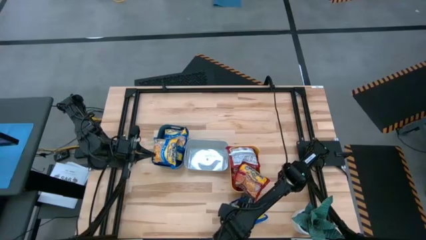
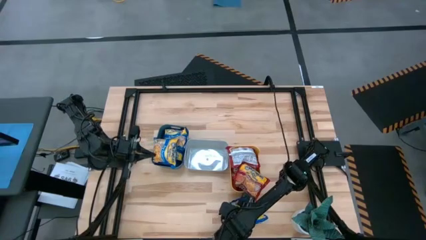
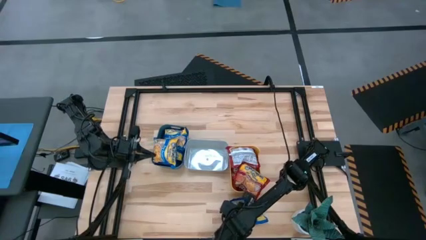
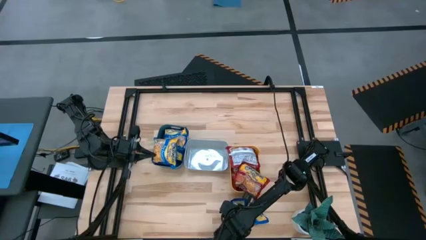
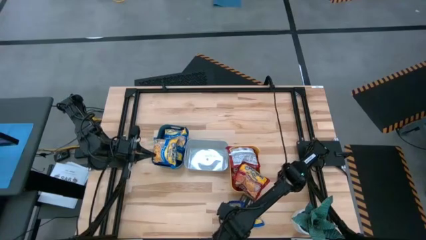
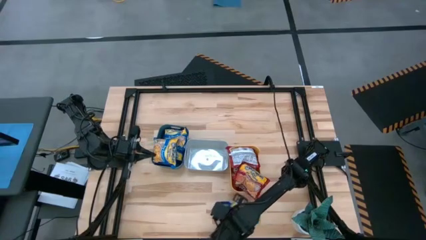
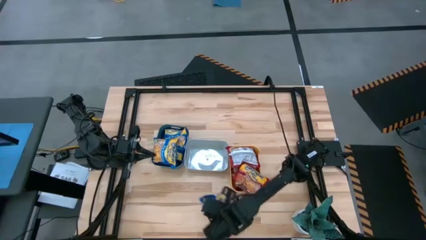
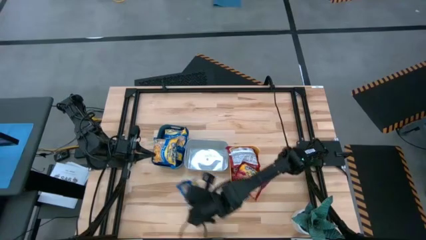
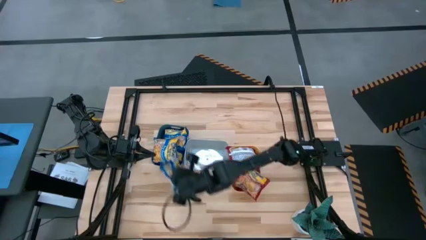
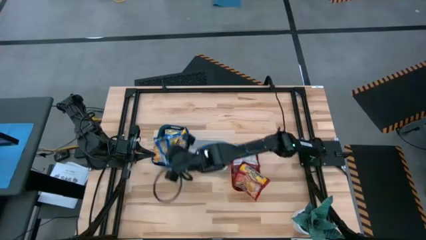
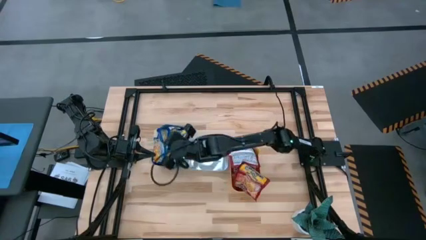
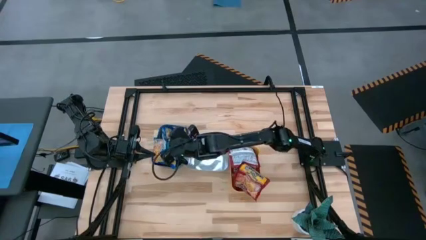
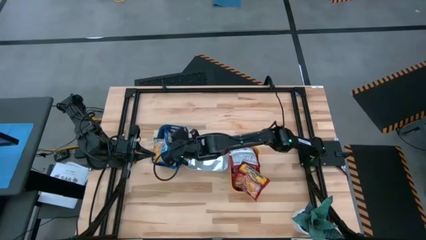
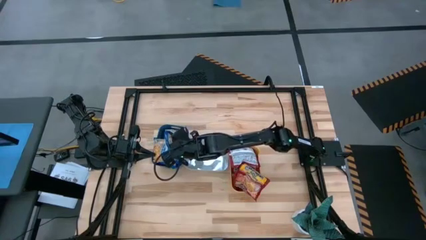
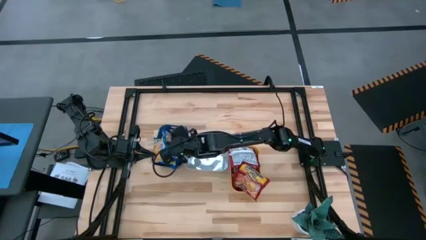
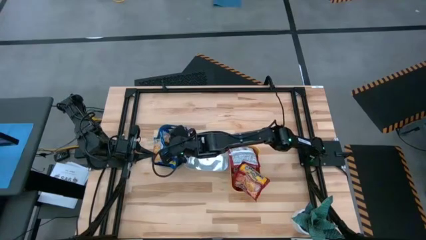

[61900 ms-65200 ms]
Task: Sort Maruchan noodles
Put the blue noodle pack into the green bin

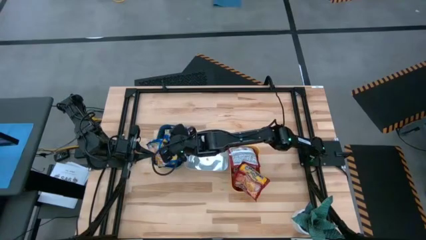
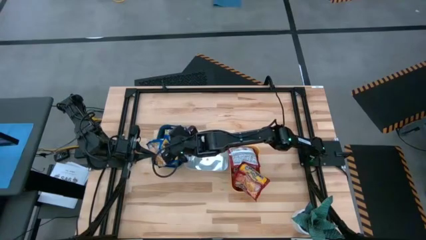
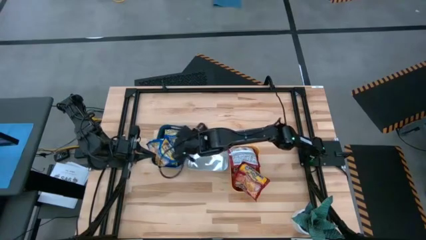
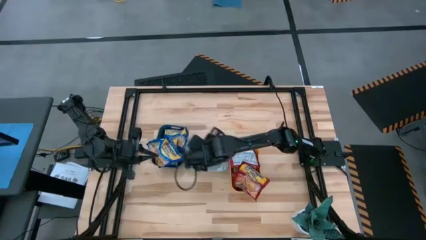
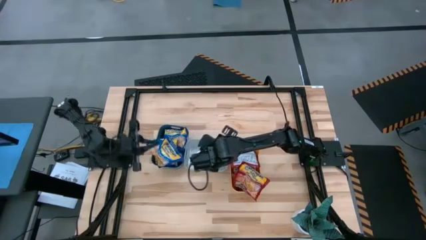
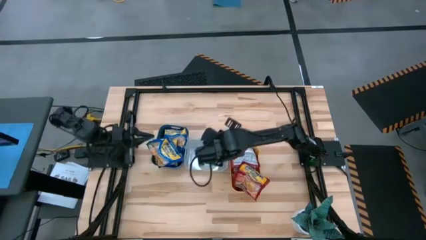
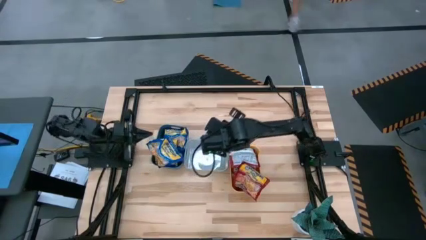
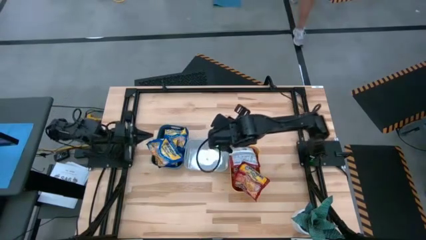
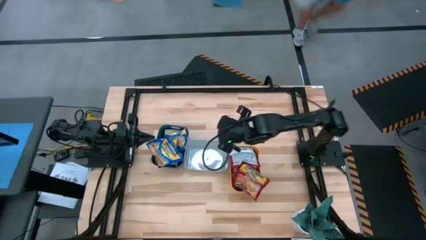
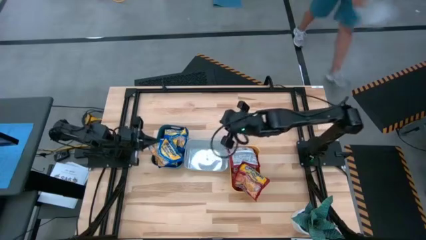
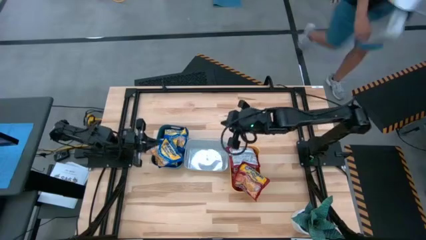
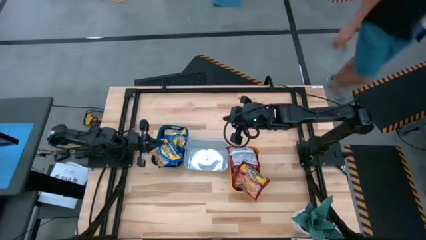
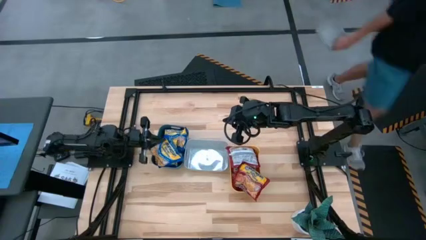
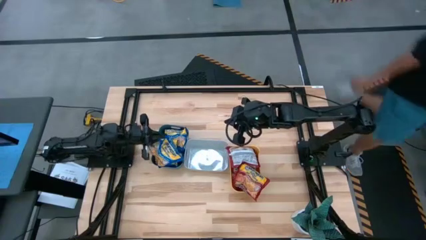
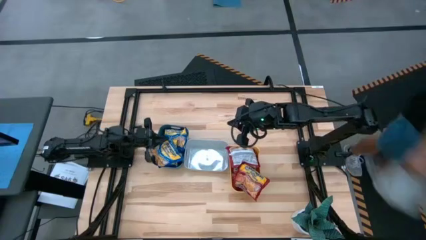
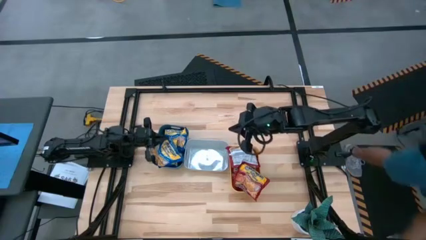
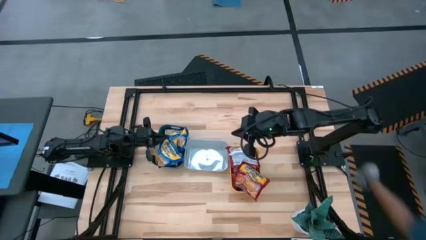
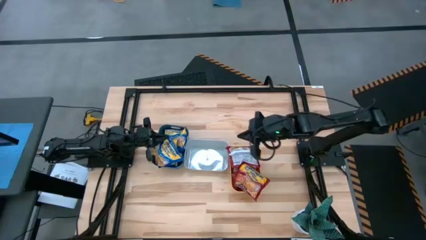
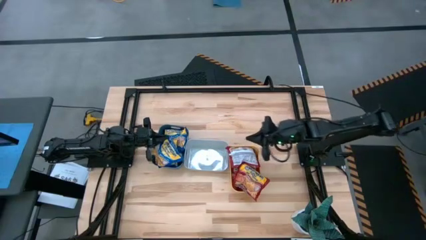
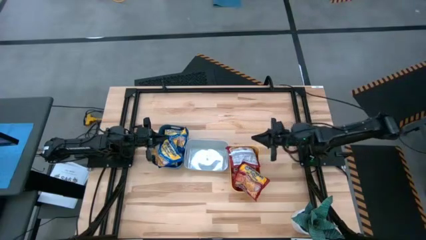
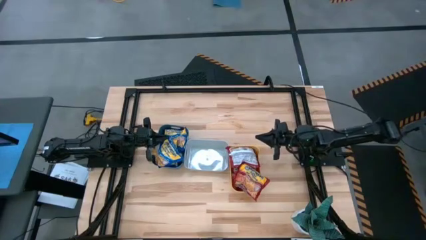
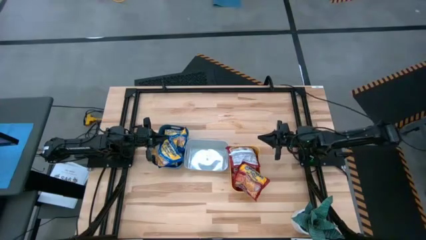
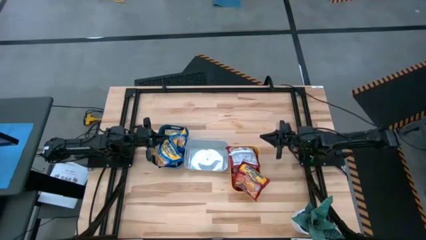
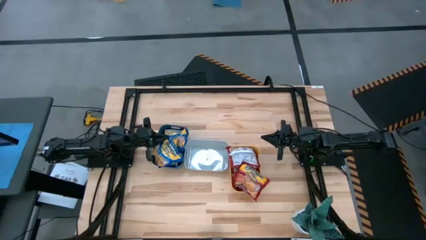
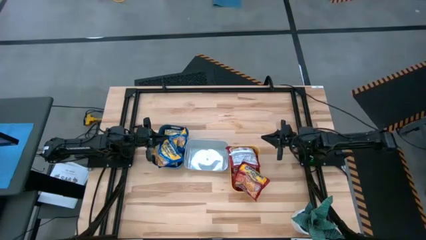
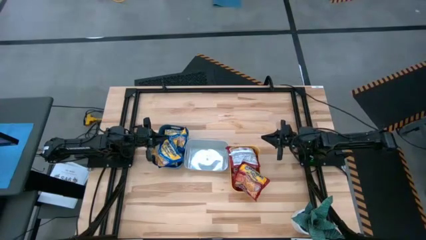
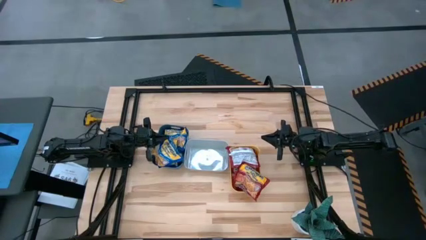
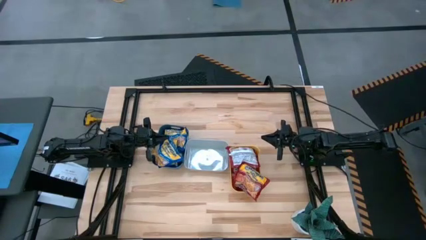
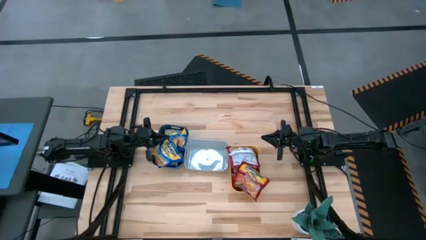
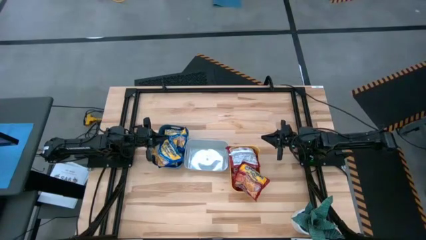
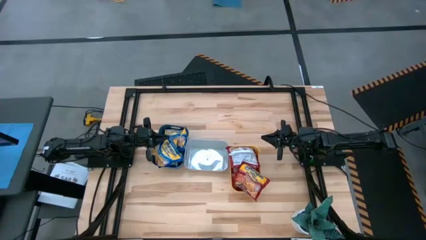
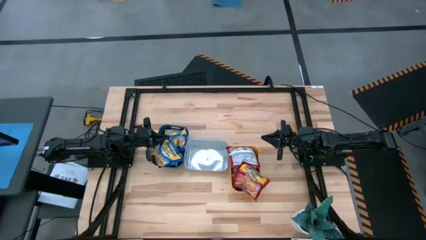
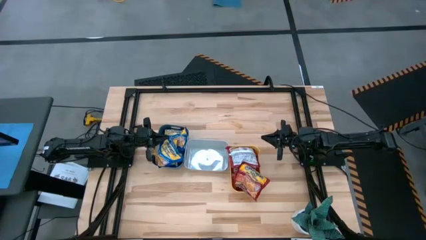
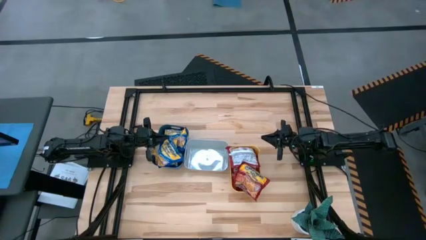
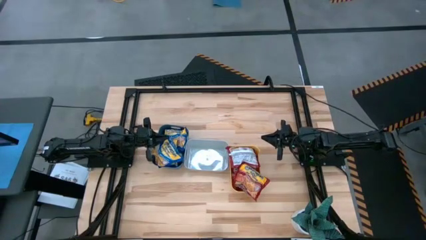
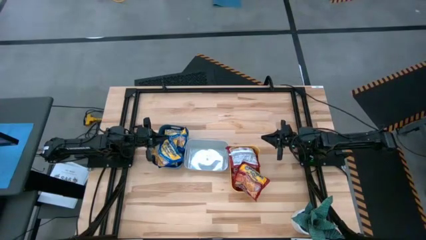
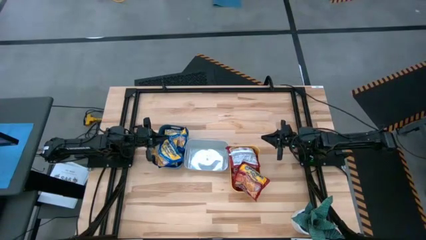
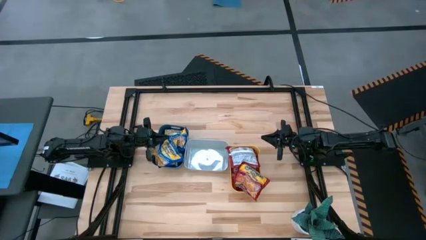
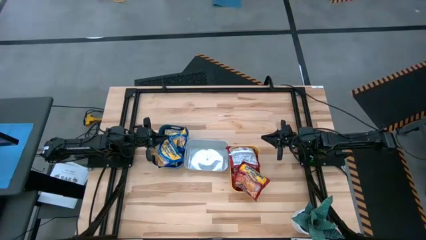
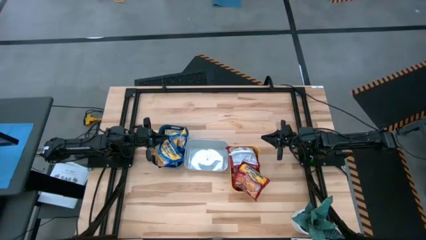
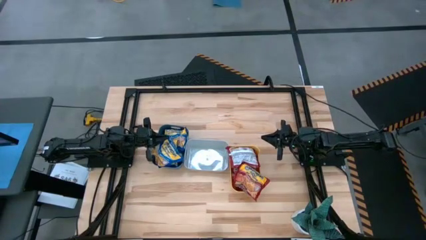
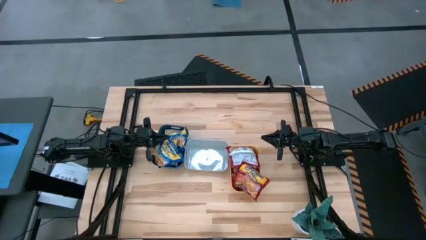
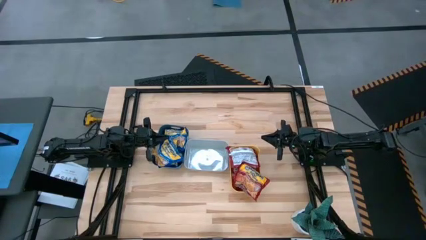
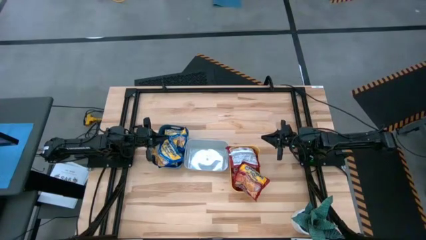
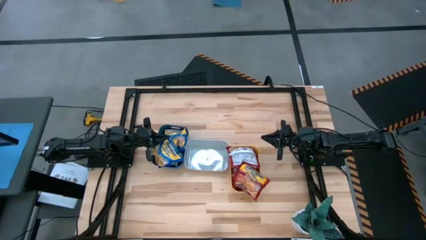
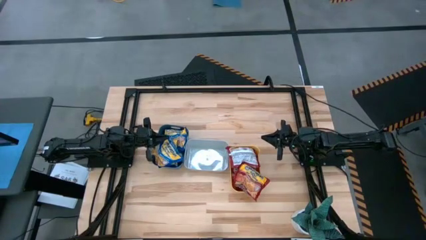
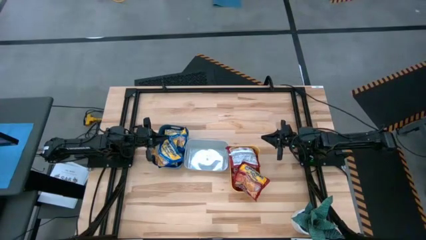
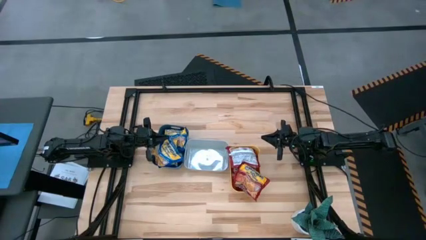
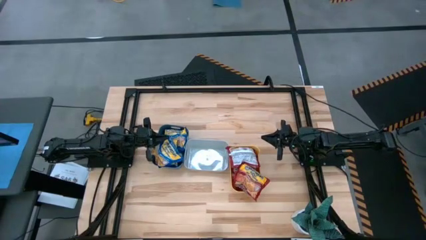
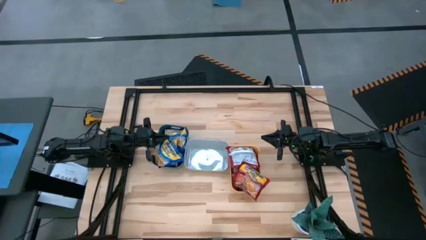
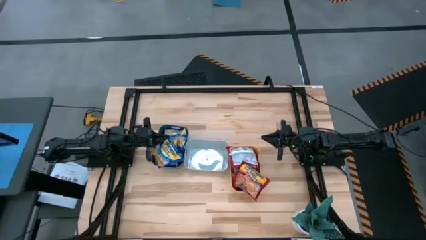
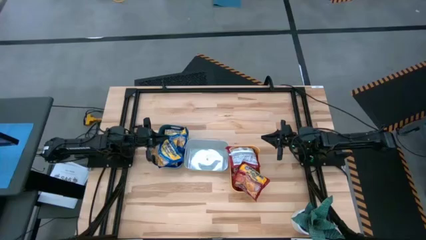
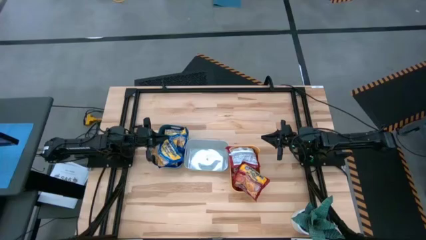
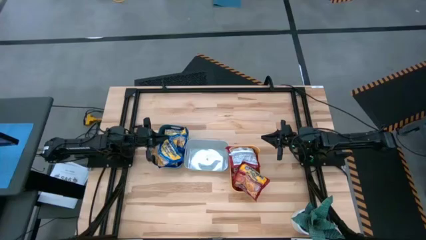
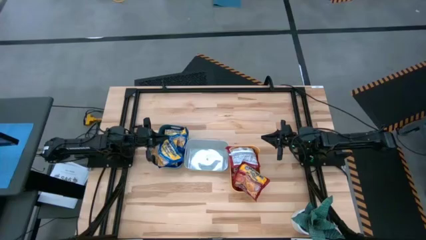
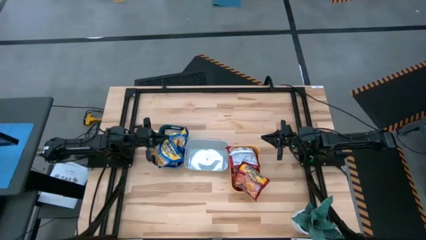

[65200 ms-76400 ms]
Return to Home Position
